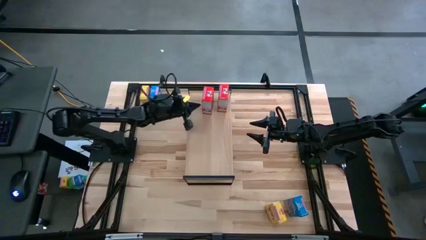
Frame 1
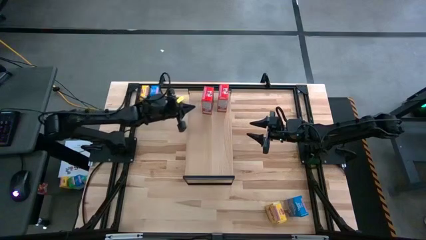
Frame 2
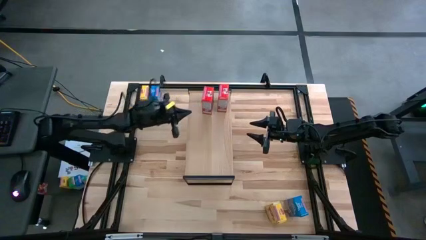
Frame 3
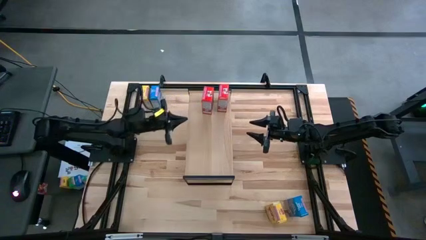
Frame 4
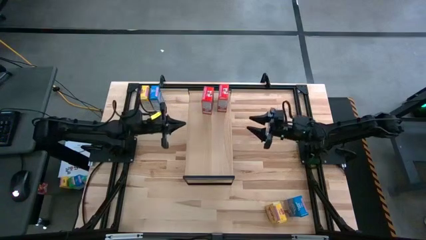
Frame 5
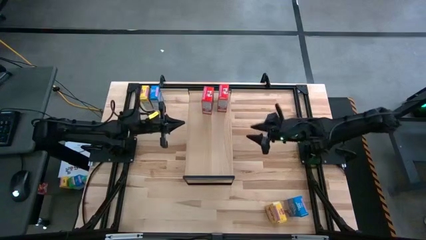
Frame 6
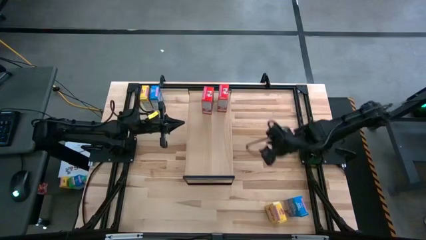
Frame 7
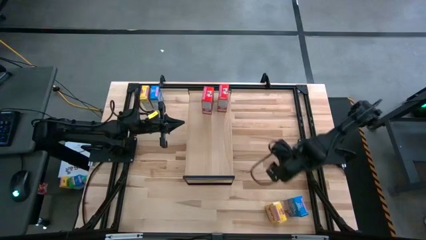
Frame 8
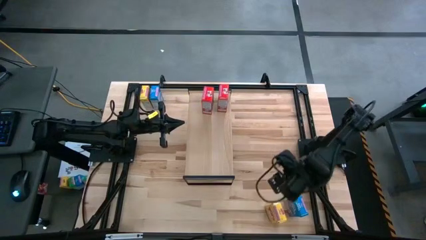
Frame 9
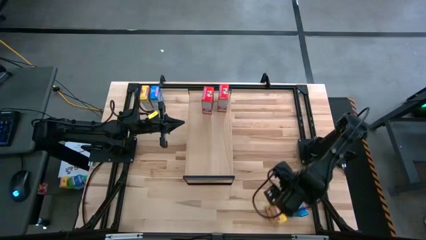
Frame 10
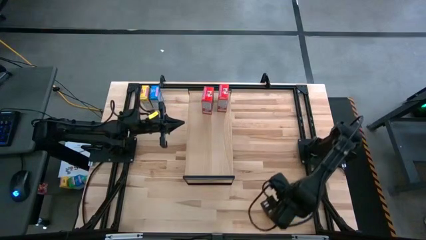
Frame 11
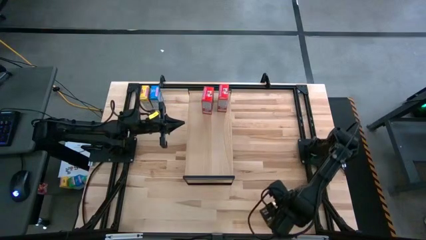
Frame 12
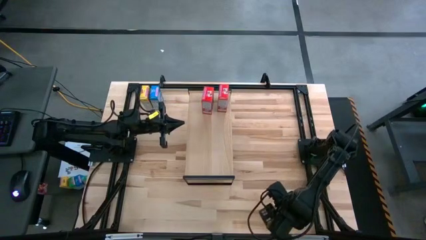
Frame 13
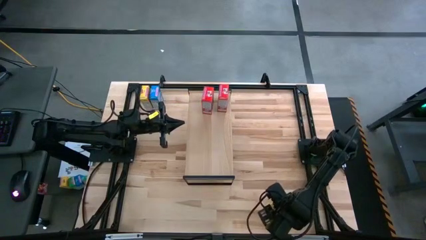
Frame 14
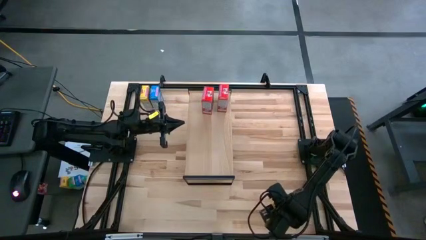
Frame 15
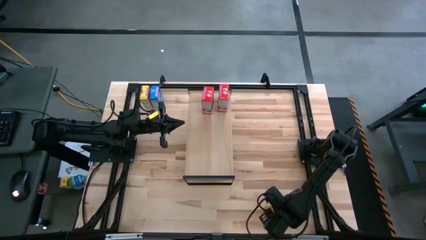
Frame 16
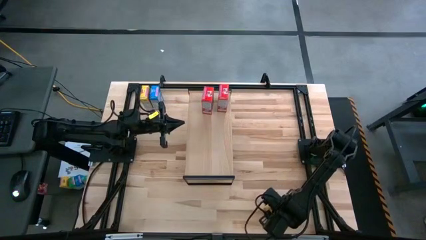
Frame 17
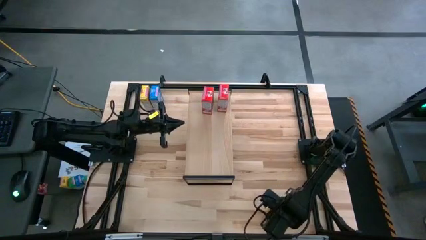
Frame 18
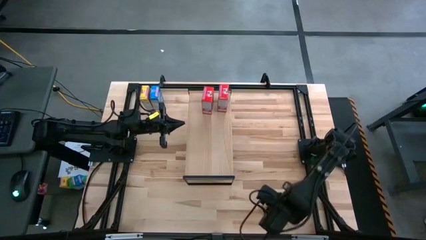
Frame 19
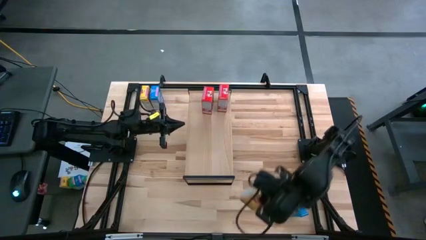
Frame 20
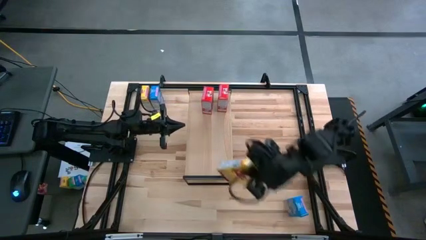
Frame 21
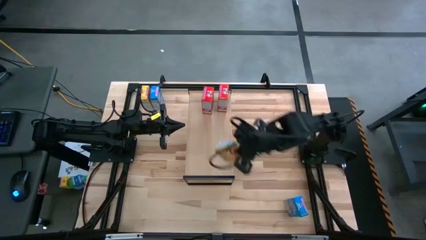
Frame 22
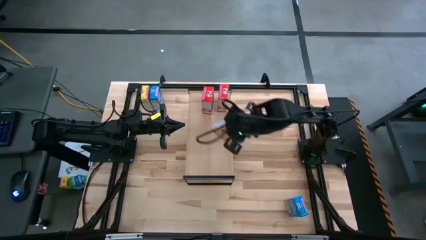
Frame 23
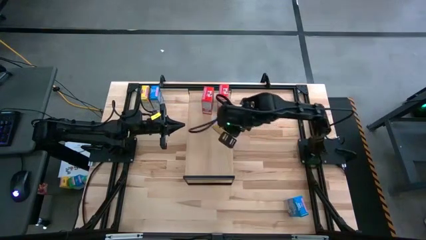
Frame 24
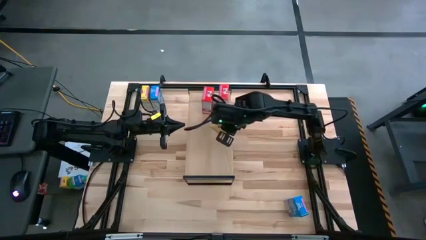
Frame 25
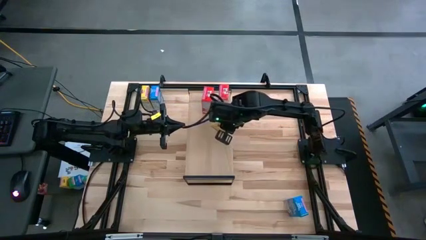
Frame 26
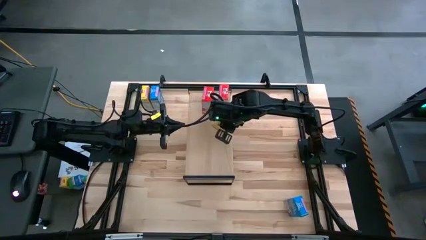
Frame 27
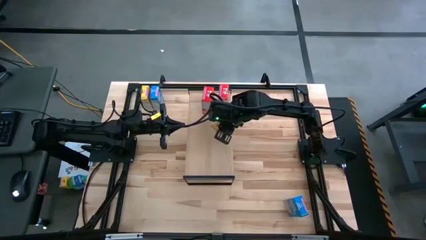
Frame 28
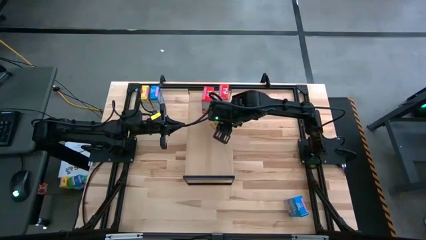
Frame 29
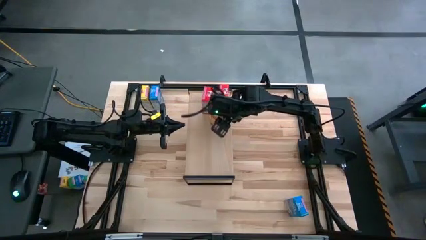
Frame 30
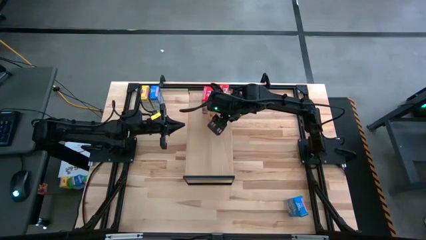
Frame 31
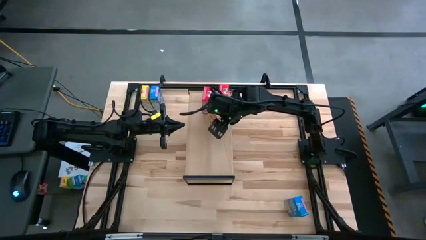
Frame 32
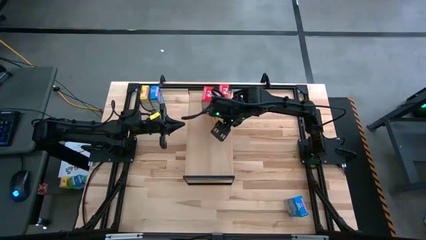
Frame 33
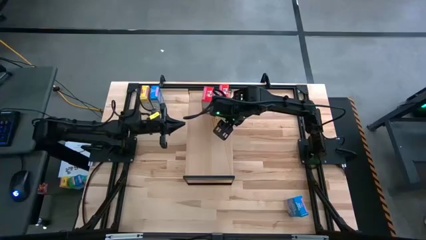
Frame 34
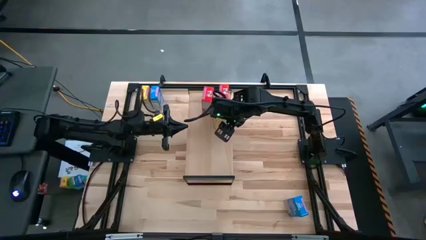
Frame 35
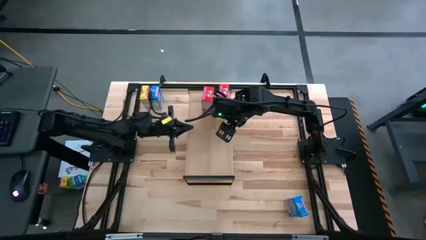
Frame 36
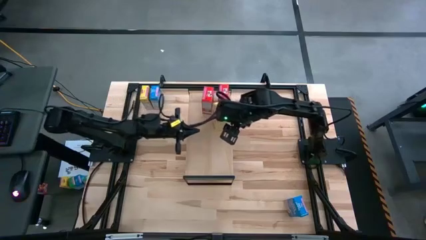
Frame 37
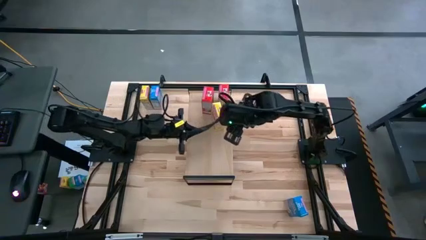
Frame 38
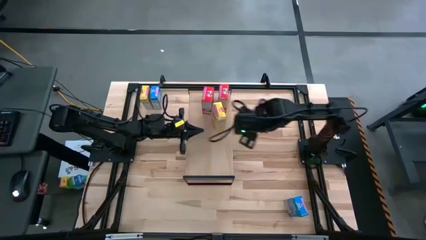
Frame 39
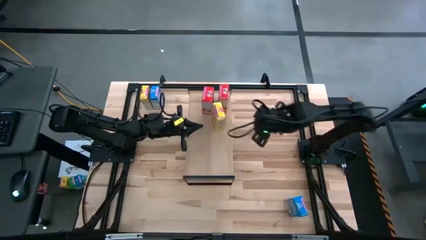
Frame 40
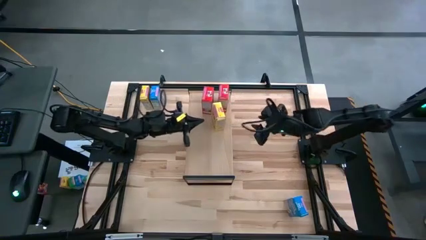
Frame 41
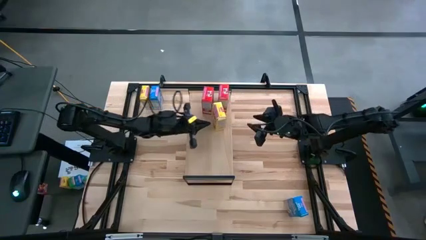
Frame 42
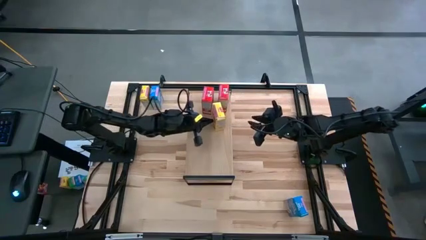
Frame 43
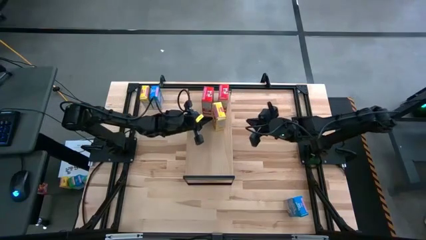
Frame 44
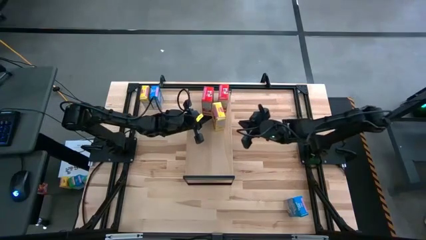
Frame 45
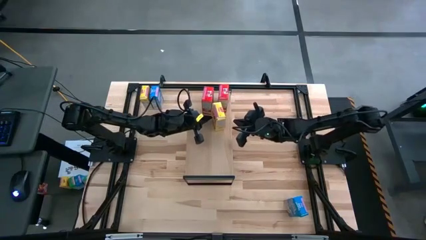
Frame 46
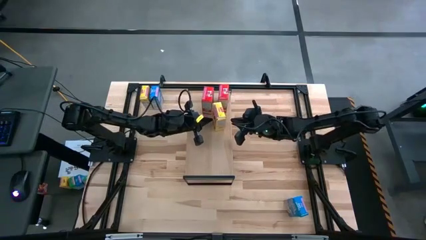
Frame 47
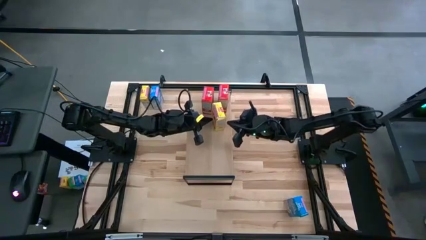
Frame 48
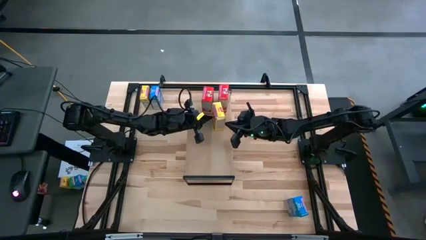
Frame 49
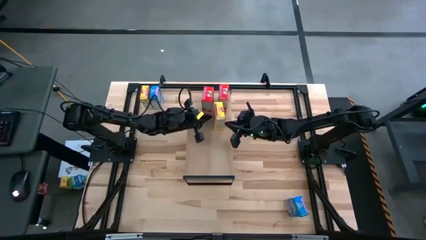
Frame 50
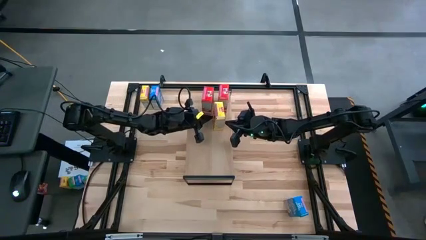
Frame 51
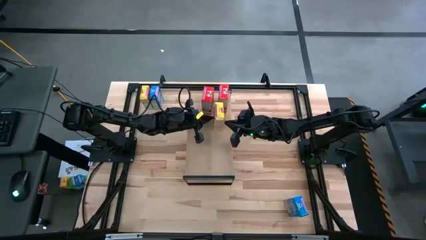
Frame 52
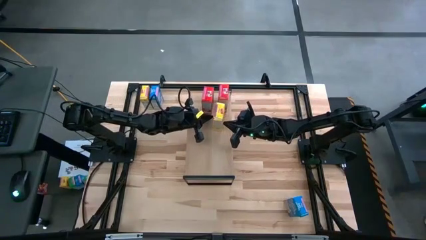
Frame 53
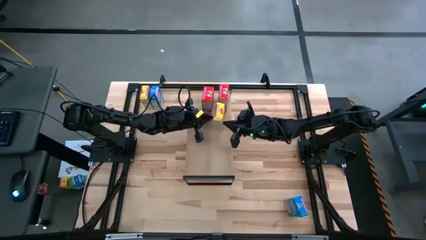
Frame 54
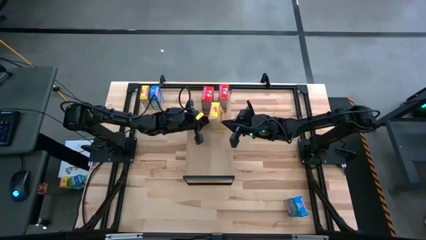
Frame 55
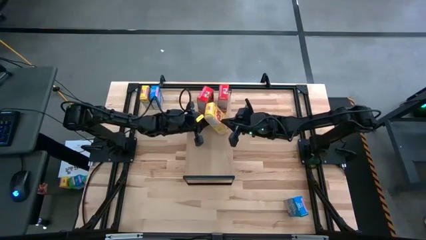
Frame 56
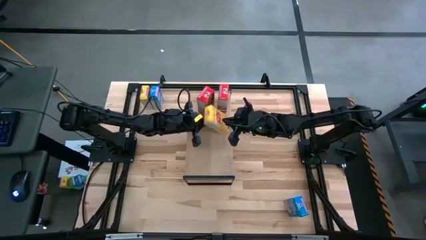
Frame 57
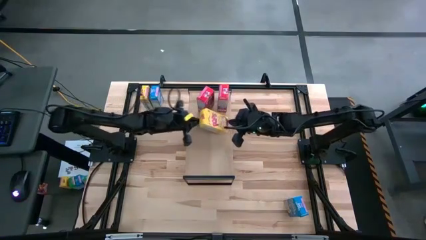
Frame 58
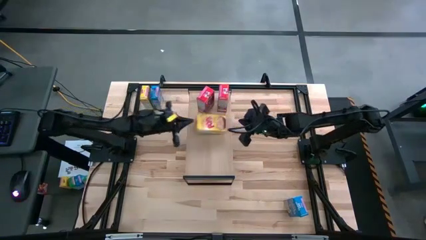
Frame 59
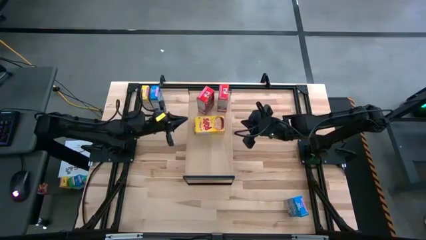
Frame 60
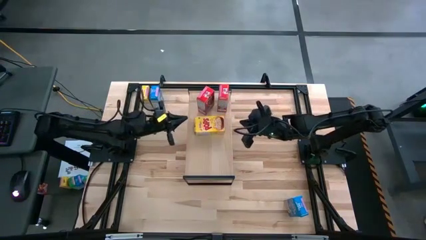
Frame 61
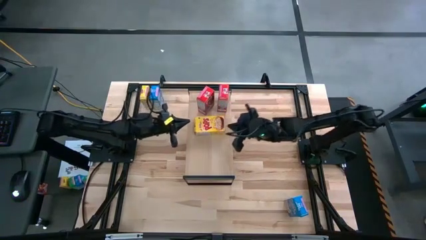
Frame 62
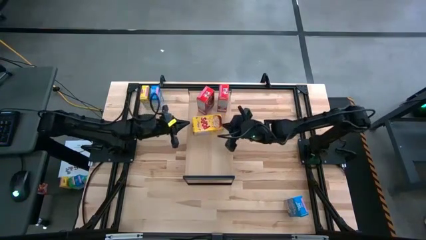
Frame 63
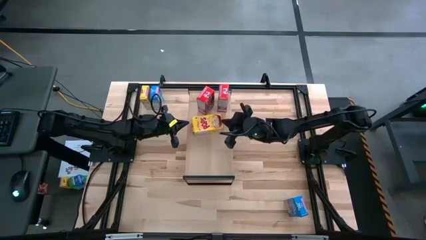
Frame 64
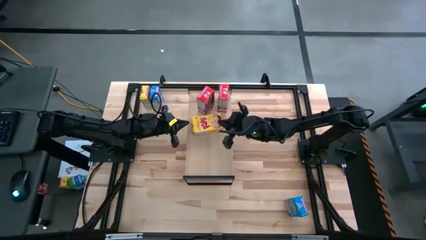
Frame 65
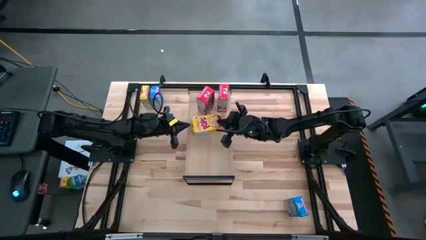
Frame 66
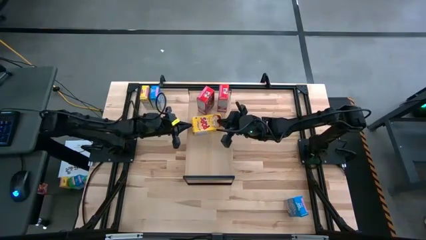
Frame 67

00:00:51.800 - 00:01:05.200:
Task: Stack cereal on shelf
Put the bottom yellow cereal box on the shelf
